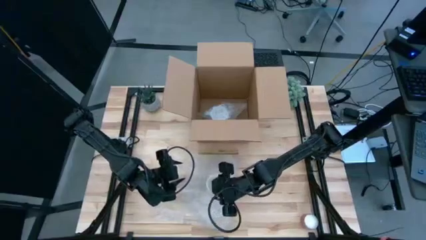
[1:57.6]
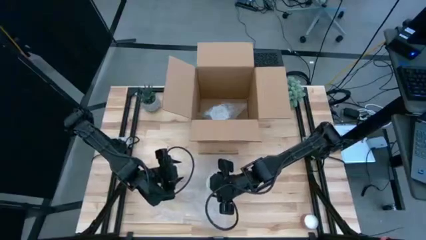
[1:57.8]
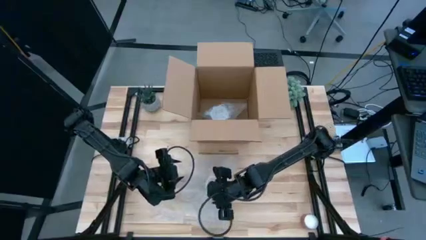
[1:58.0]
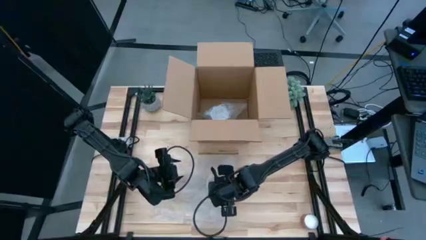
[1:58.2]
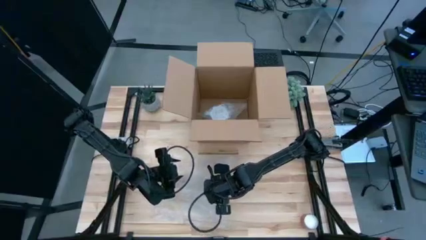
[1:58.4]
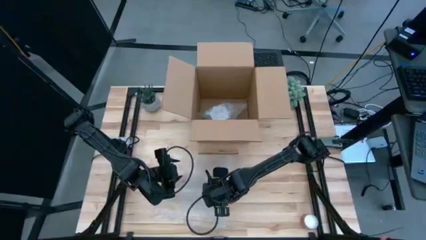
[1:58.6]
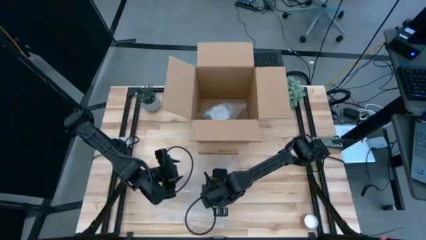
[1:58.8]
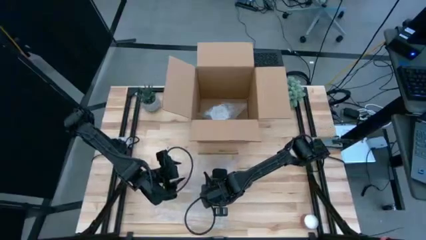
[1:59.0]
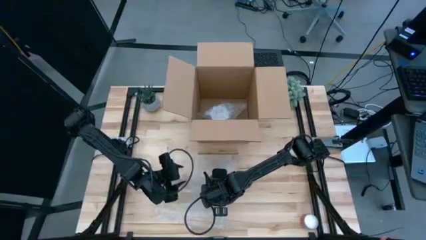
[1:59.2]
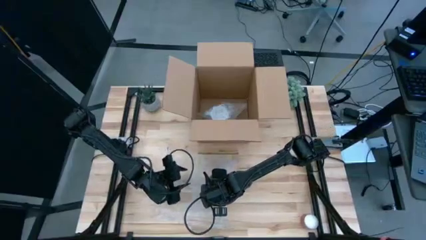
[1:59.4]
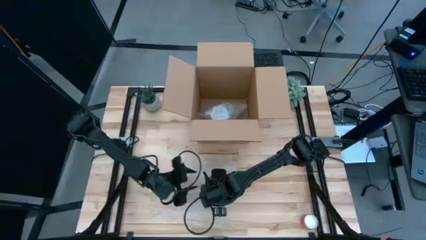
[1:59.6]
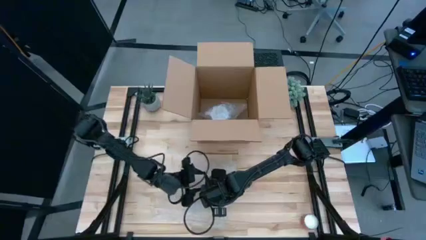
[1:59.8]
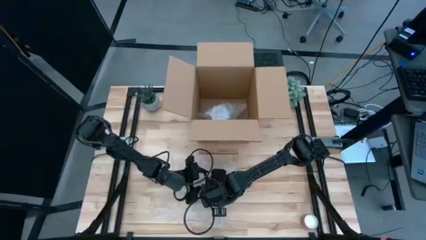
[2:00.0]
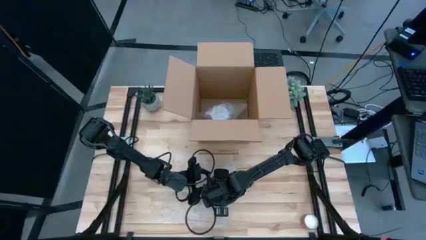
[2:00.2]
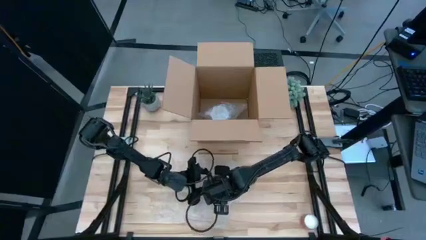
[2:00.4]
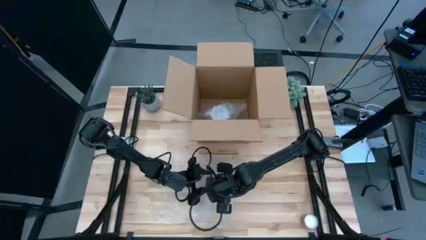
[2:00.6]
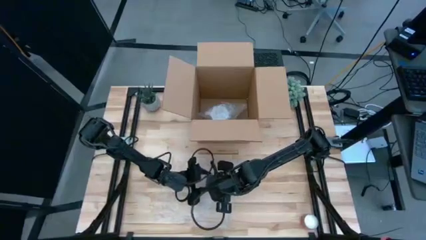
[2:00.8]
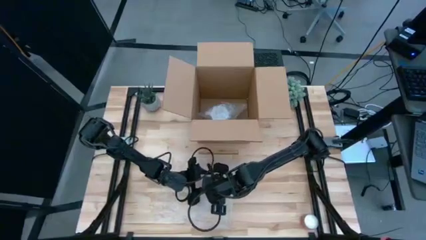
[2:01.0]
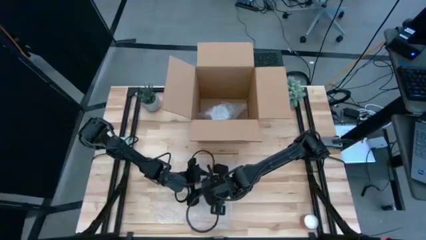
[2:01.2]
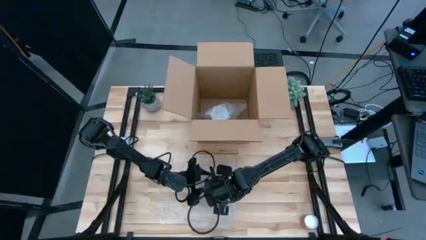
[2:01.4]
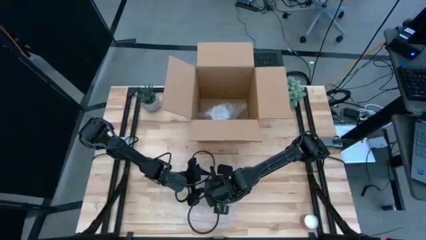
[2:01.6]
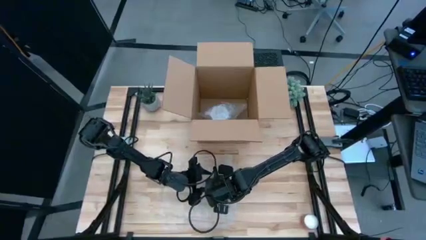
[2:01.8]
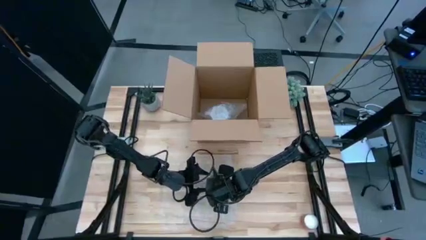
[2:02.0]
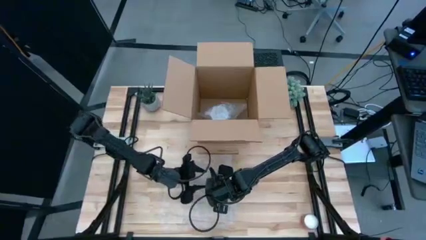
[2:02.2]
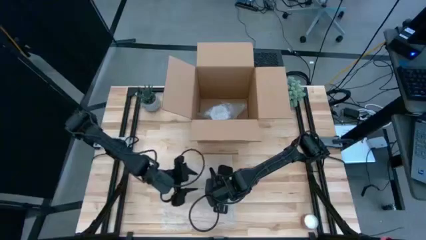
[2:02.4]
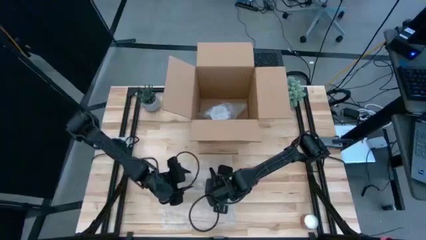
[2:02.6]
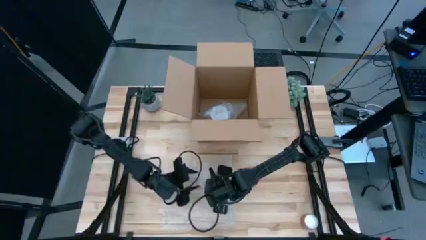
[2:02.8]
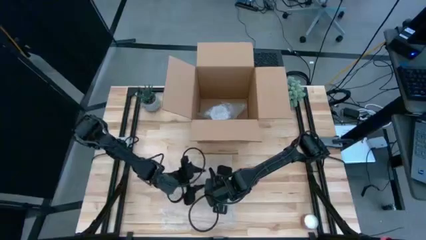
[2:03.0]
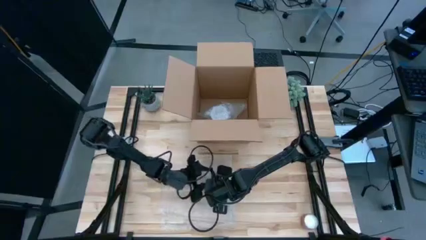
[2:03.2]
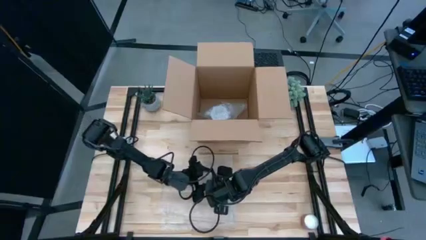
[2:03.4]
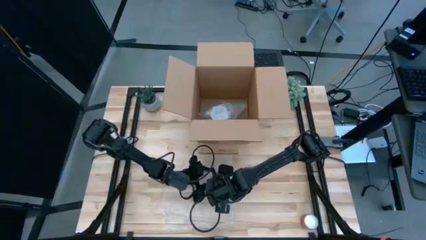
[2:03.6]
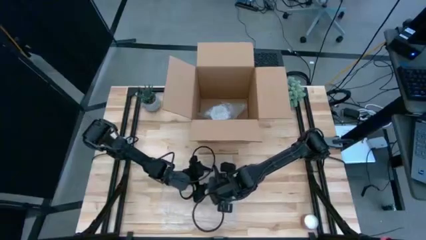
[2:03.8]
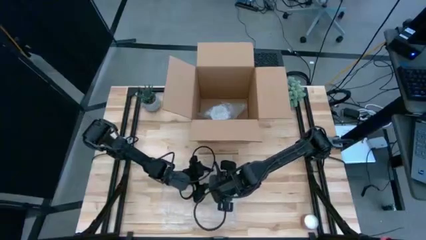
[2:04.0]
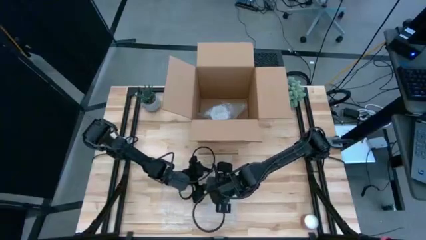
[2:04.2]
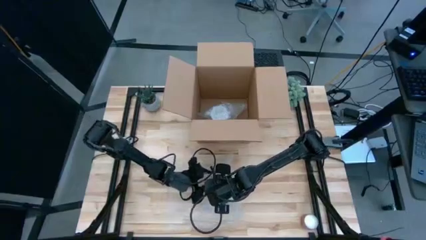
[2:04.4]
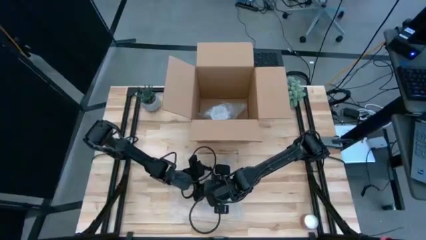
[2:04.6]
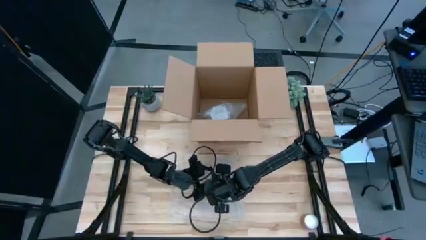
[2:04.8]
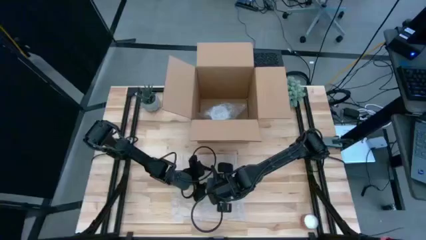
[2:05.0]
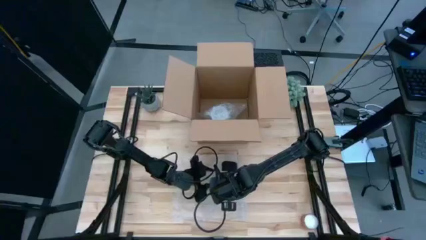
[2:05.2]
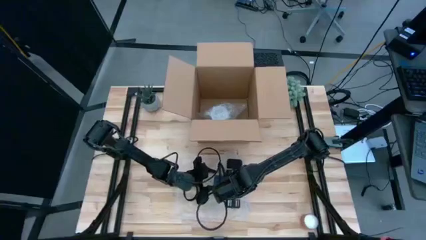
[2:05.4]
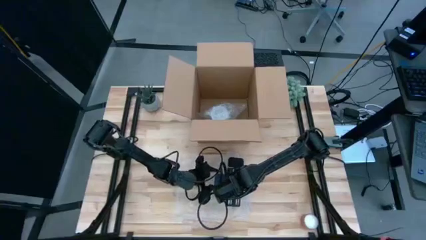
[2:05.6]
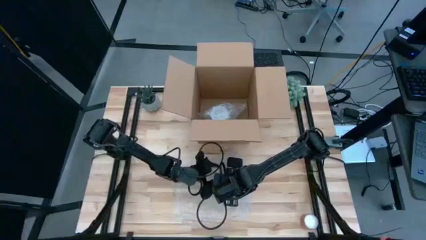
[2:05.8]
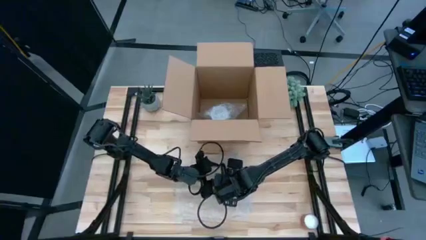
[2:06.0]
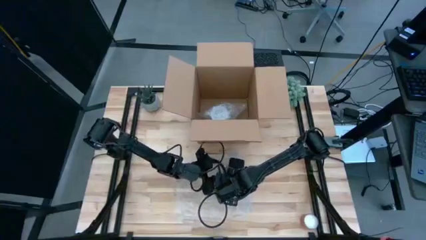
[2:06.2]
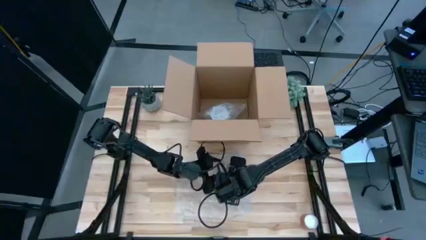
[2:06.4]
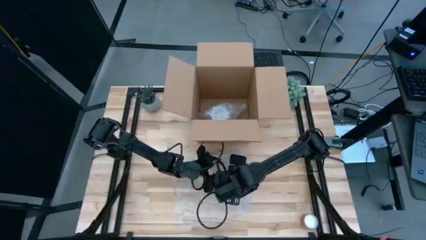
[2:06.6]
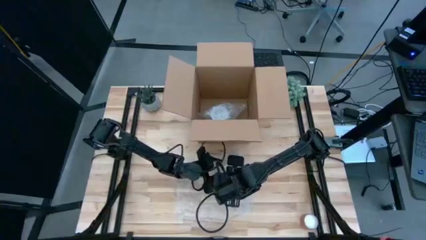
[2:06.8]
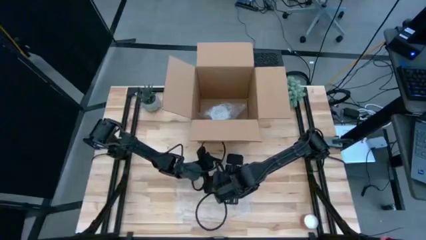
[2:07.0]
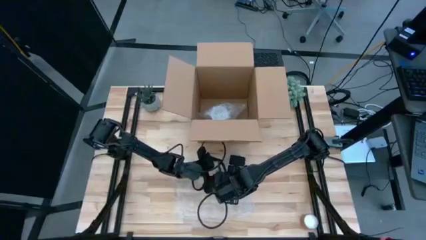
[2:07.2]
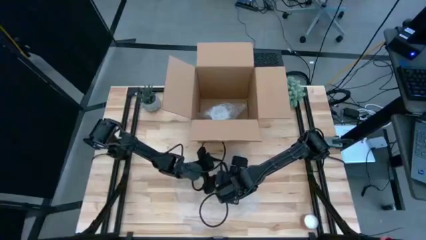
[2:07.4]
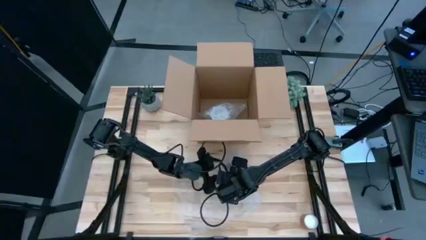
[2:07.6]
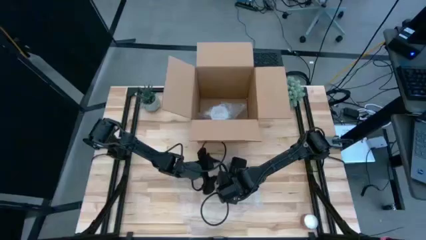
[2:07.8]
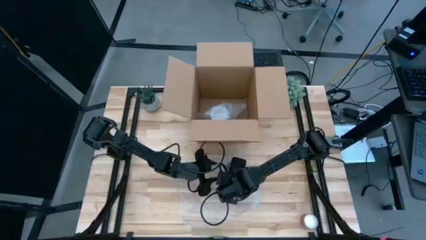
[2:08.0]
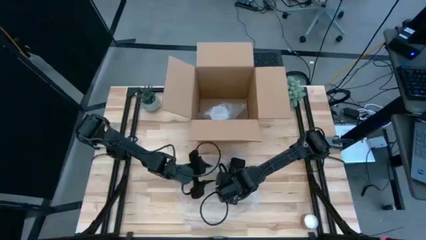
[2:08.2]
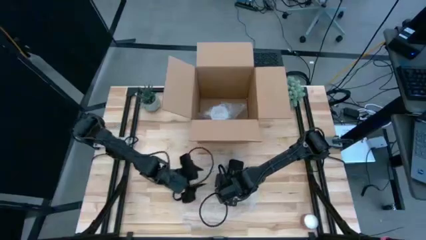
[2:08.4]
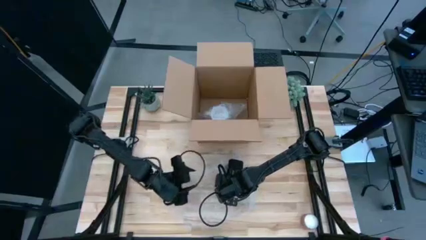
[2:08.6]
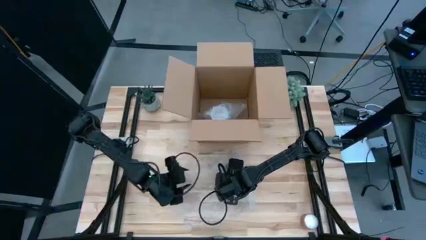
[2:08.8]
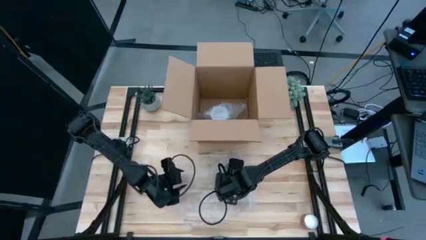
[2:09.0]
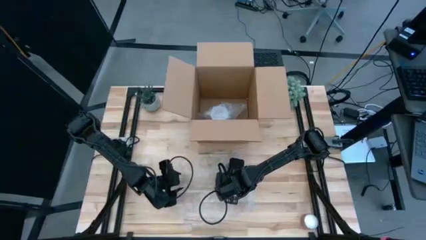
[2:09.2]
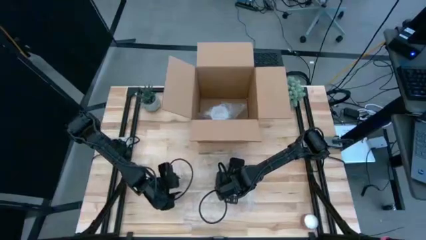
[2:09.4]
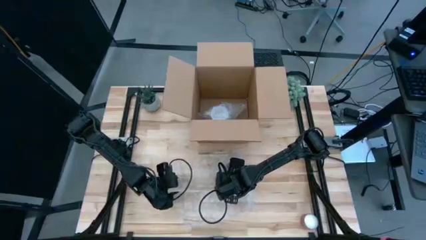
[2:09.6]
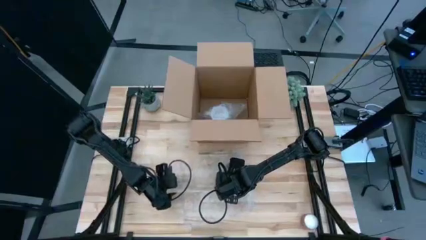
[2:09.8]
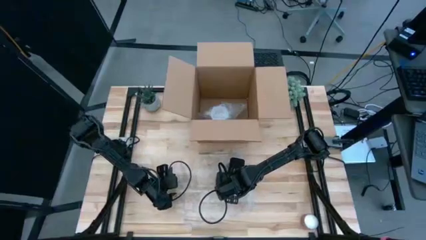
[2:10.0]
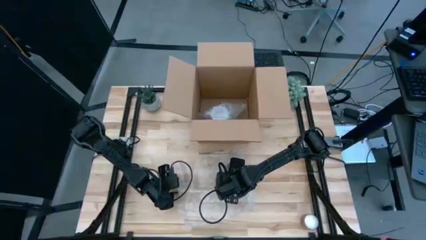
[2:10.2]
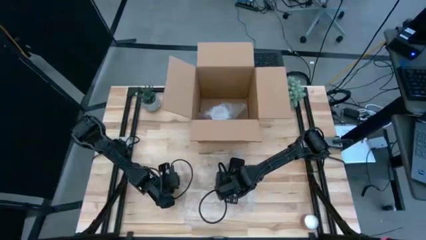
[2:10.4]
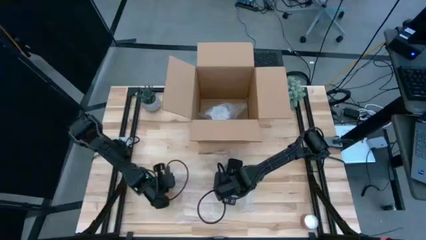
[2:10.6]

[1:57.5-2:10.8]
Task: wrap mug
Wrap the orange mug with the bubble wrap

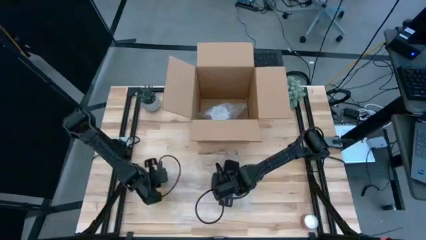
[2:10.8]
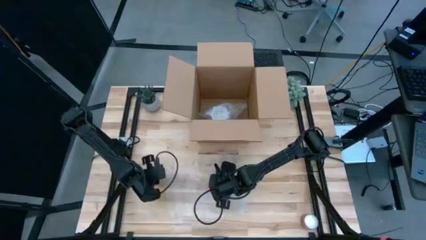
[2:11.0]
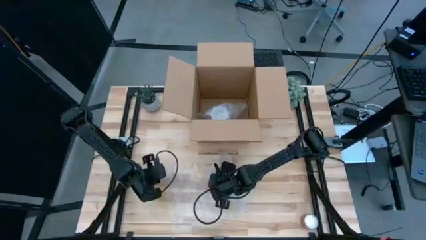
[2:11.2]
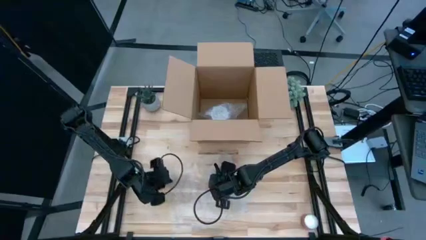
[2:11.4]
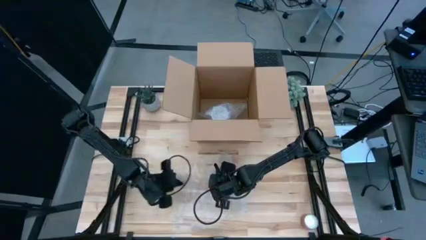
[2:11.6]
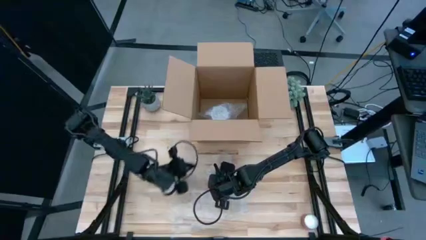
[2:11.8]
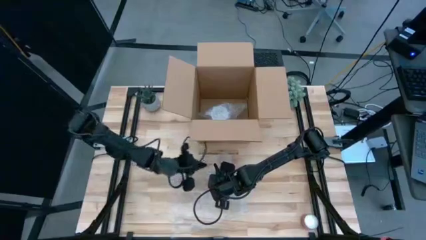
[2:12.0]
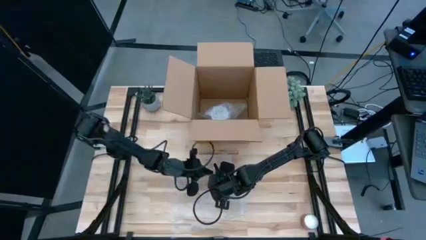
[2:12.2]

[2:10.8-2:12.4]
Wrap the orange mug with the bubble wrap

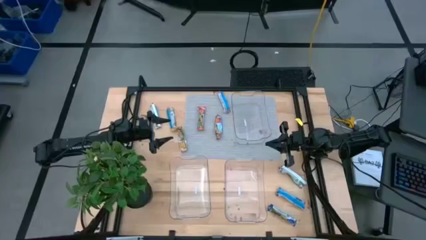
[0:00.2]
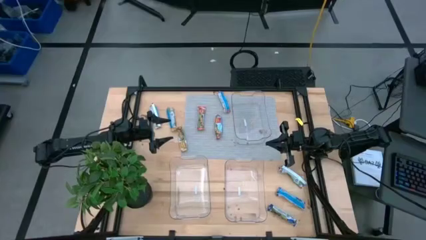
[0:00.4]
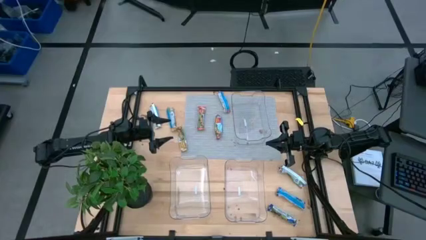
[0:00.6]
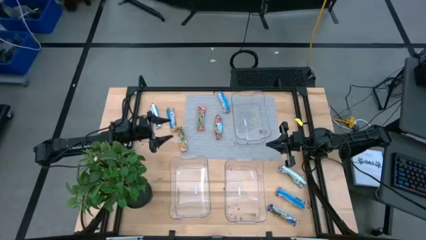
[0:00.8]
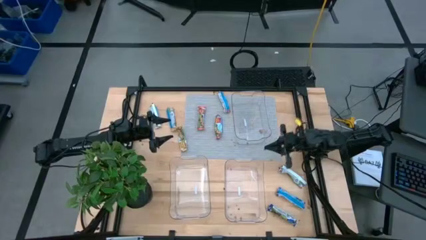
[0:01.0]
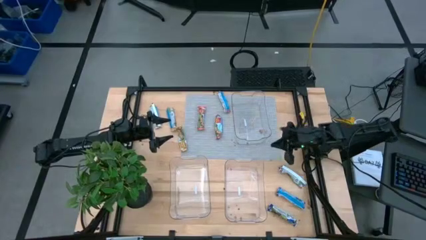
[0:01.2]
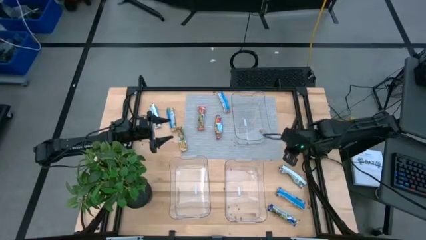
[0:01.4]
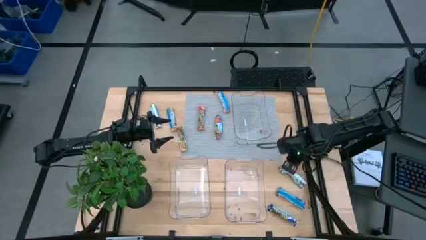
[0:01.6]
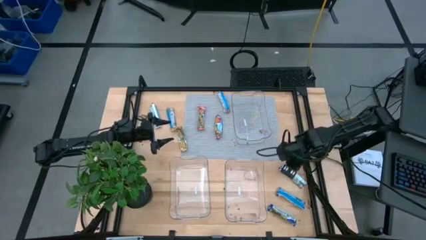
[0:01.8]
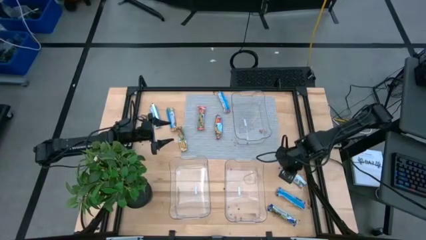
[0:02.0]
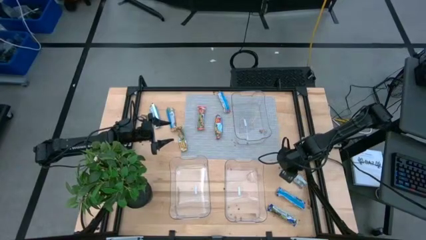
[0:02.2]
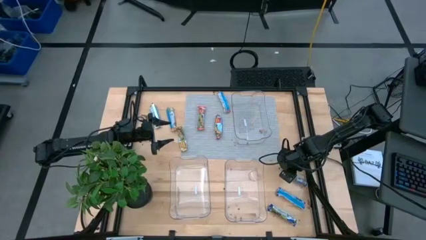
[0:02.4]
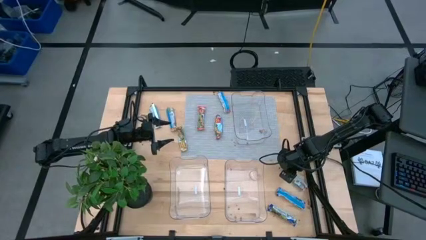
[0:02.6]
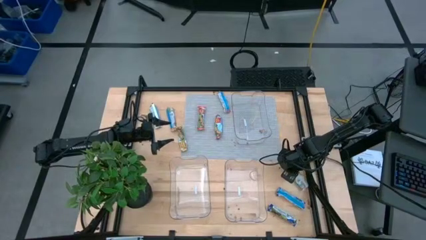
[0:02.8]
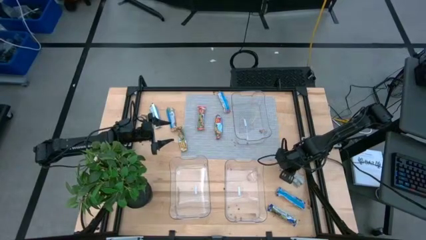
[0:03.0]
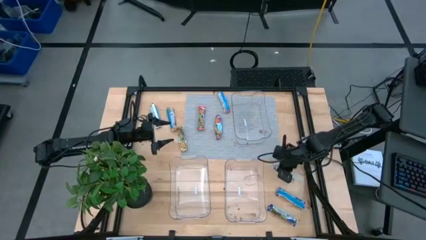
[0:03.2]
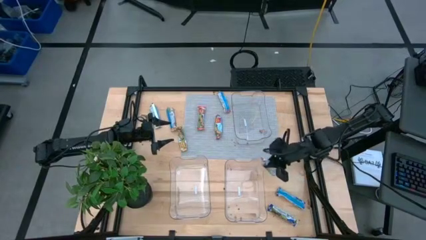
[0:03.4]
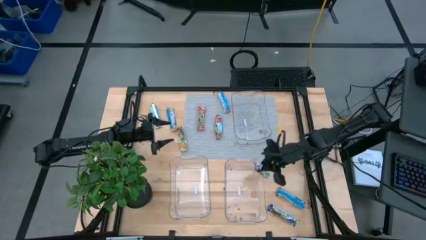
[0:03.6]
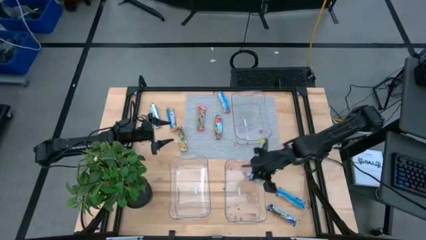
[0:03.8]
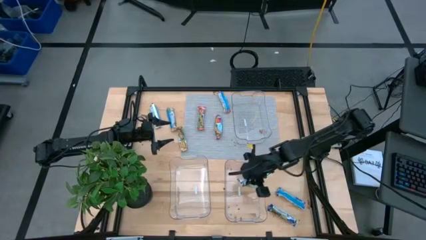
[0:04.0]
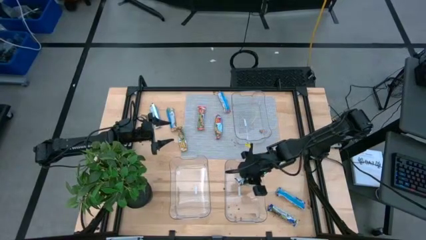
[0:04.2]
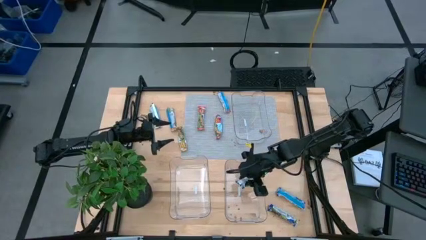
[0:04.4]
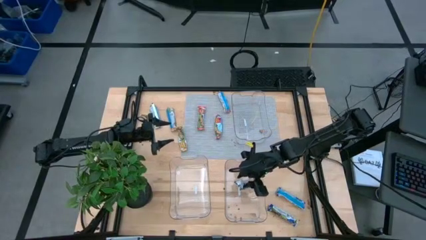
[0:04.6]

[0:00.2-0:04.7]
Task: Pick and place Granola Bars by type
Put the top blue granola bar into the bottom right transparent bin
